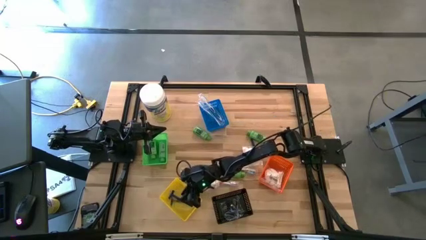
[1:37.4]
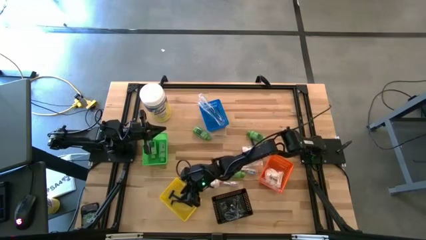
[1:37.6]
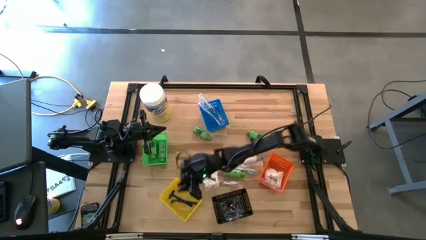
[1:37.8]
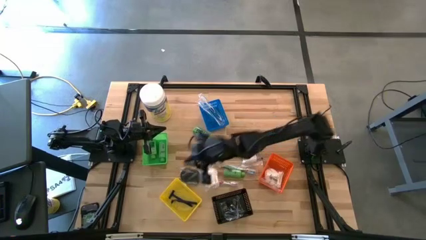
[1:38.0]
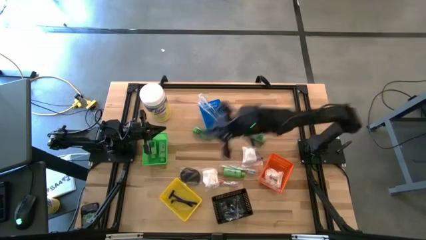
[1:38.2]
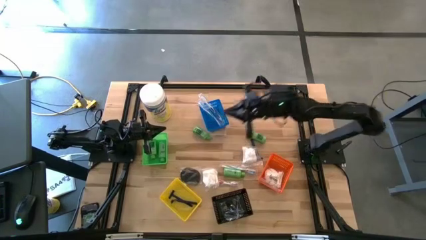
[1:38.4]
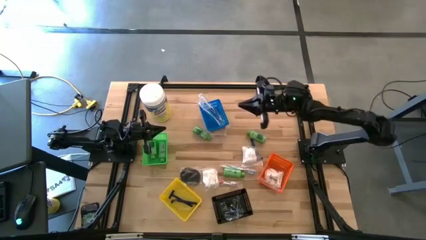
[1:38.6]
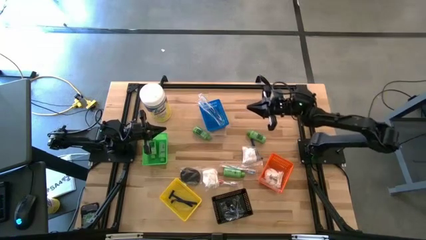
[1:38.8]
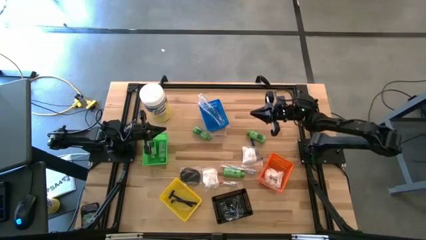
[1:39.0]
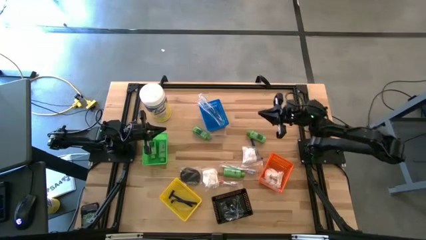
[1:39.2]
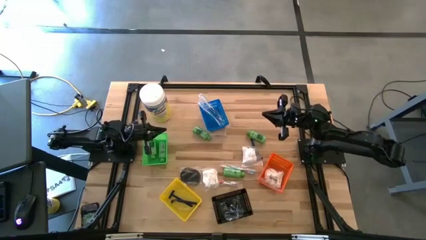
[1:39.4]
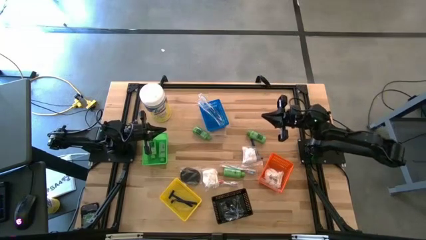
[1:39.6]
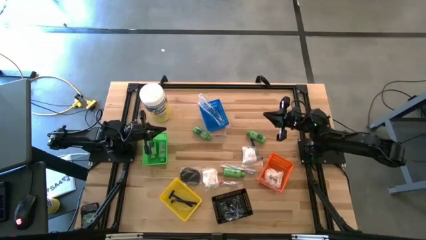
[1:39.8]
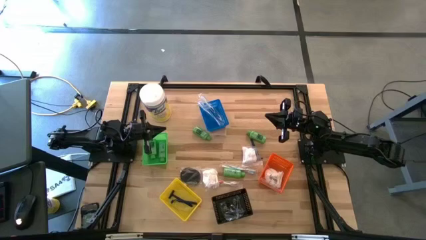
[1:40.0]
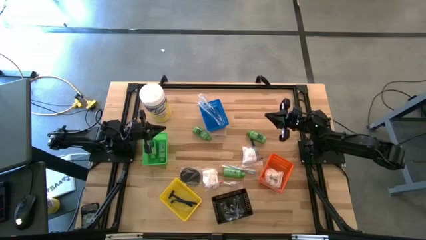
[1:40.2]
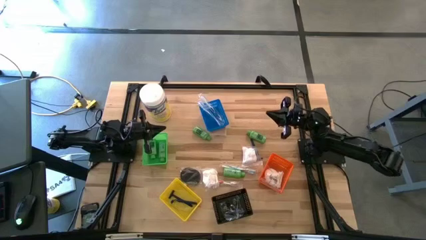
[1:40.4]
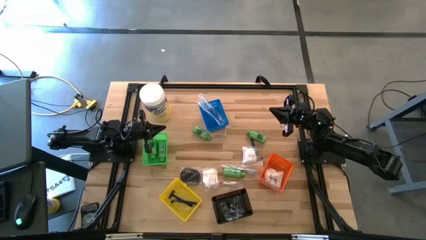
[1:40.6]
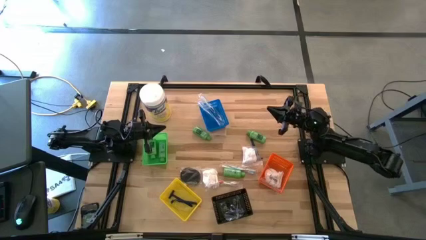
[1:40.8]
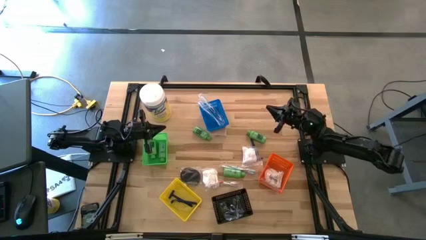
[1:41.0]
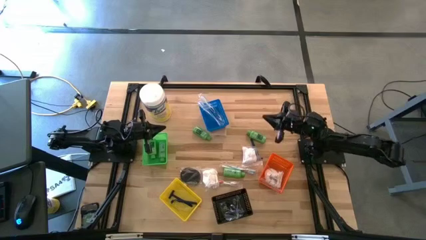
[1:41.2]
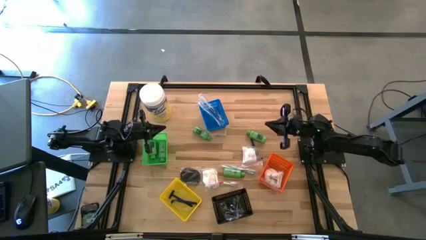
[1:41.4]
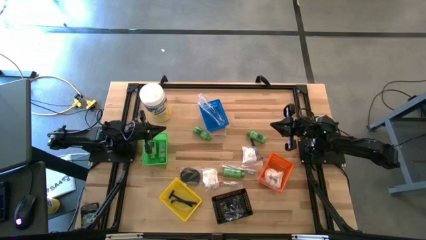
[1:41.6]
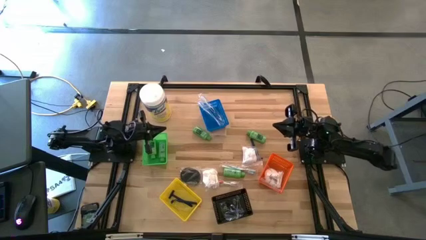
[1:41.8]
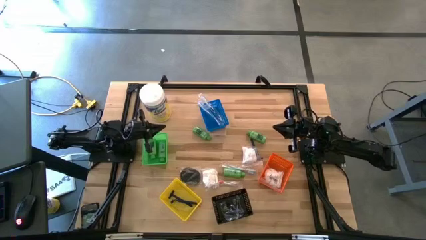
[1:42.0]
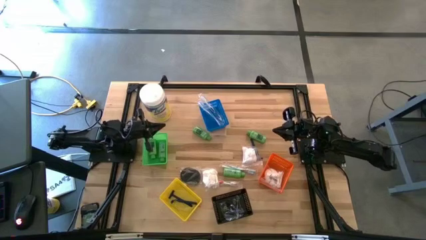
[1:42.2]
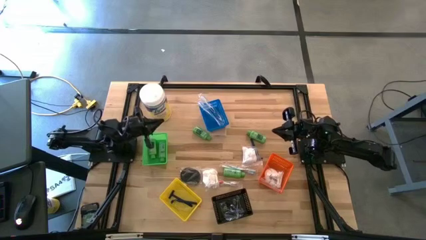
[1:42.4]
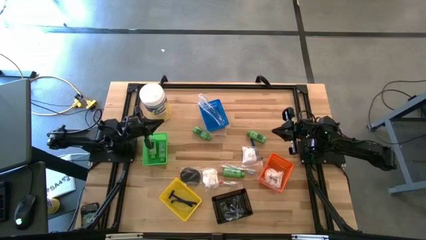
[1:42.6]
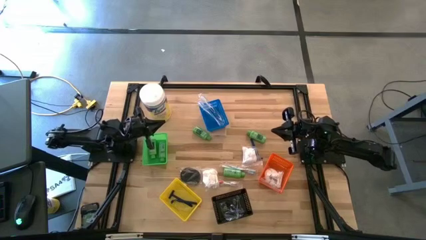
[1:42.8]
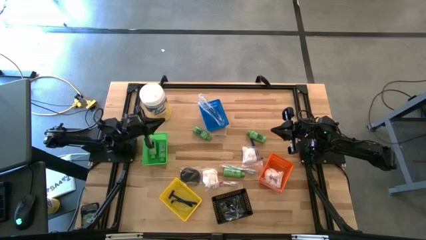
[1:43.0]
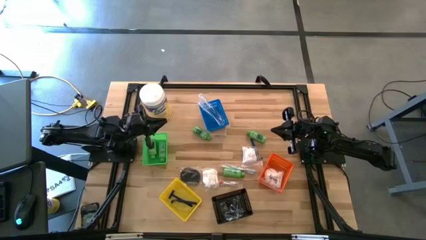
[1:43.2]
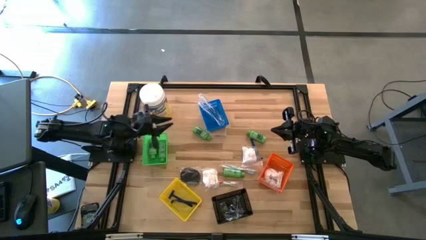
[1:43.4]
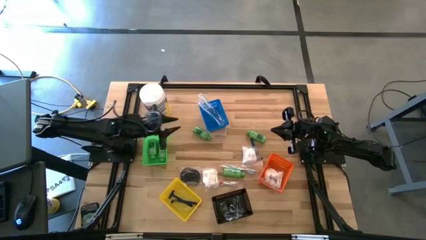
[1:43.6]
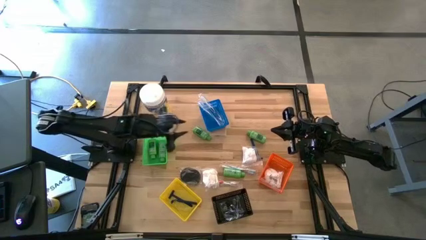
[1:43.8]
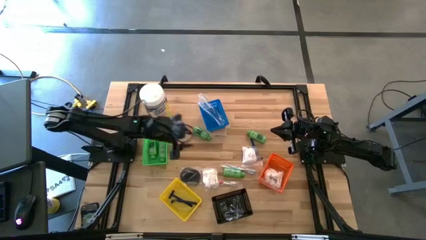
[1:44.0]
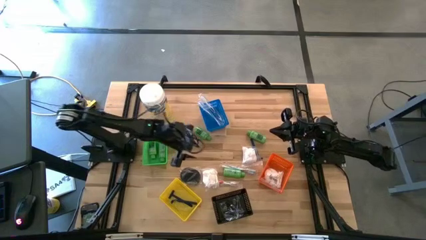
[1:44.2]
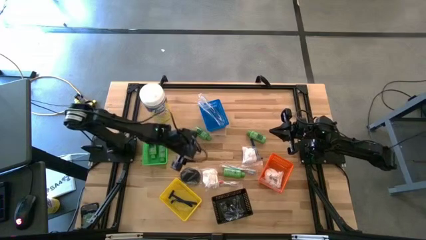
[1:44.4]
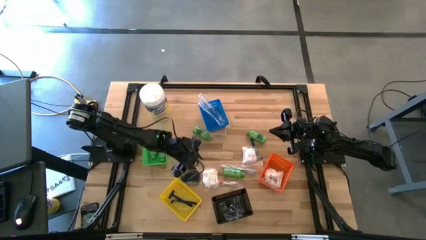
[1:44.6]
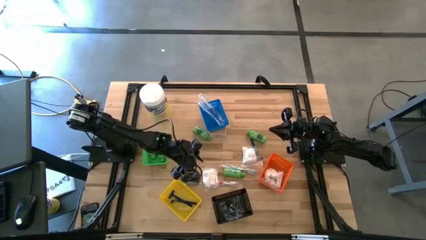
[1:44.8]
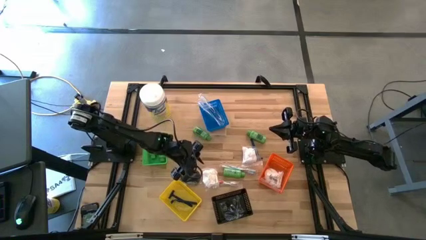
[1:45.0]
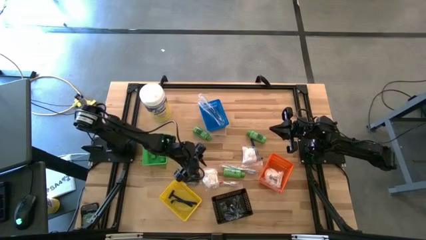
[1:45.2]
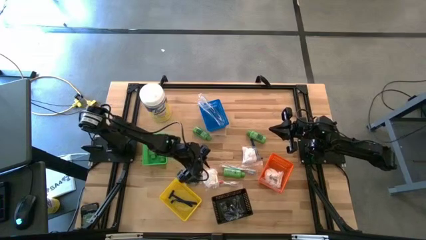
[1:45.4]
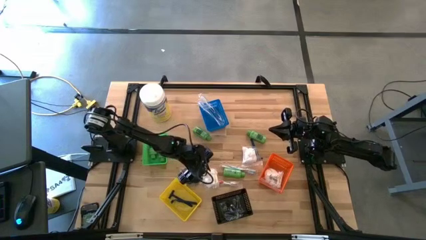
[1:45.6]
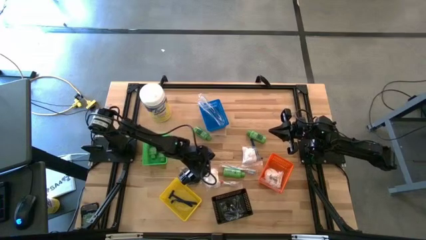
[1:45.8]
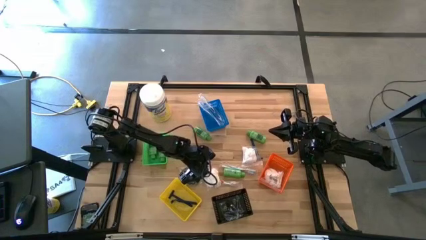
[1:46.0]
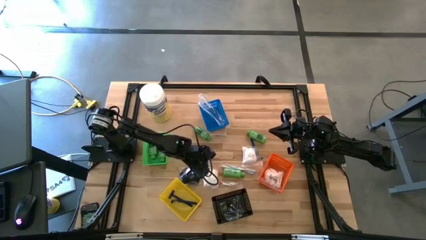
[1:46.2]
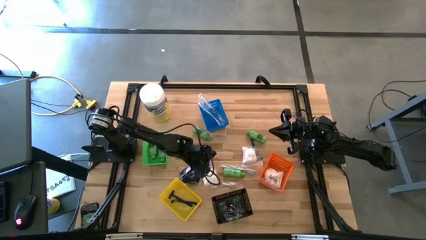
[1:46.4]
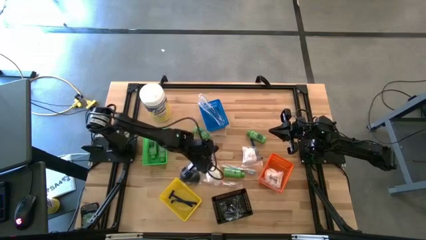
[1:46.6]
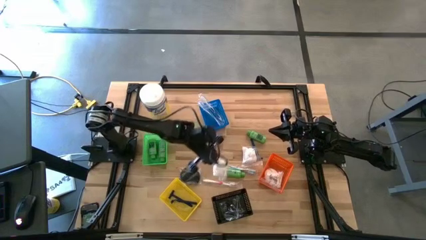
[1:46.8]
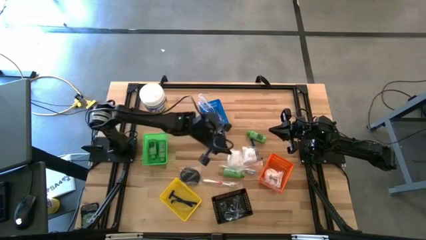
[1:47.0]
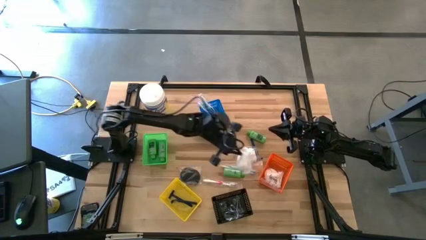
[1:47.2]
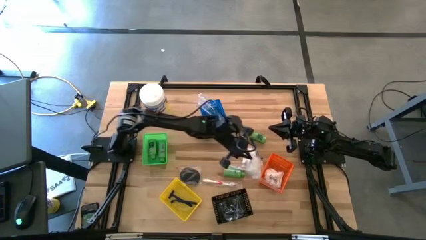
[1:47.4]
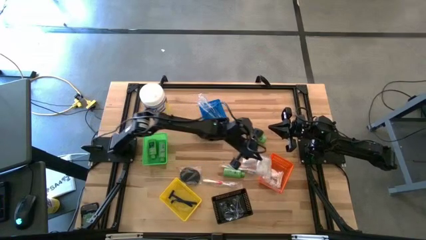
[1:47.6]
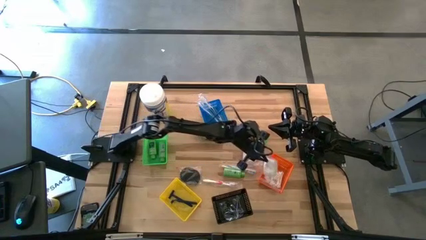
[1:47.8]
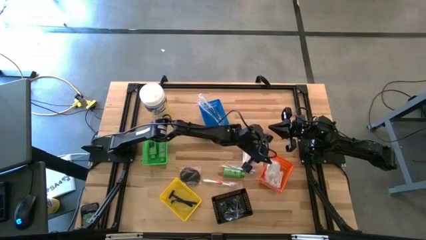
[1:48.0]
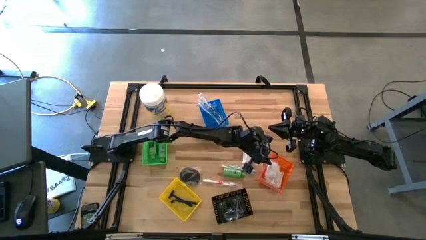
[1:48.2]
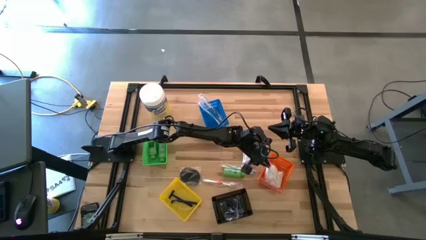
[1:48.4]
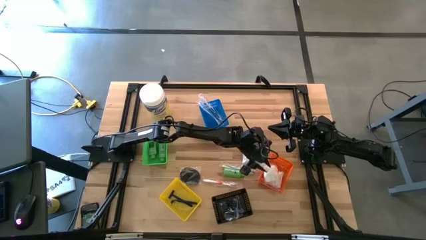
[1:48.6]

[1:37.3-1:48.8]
Task: Pick & Place Travel size toiletries
Put the white cotton pack into the orange bin

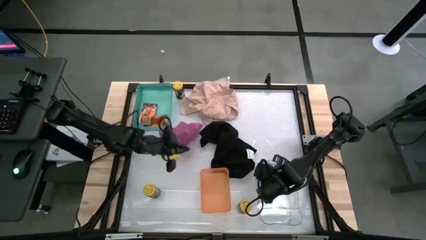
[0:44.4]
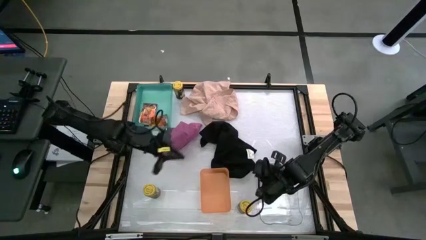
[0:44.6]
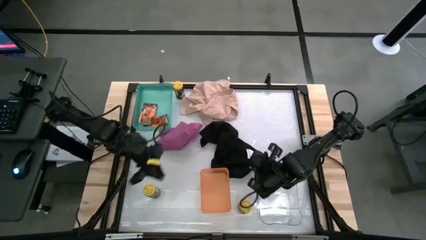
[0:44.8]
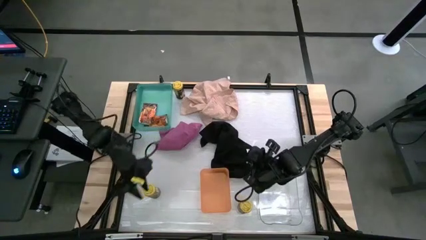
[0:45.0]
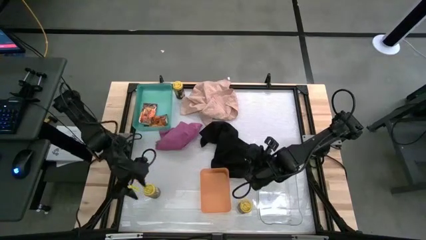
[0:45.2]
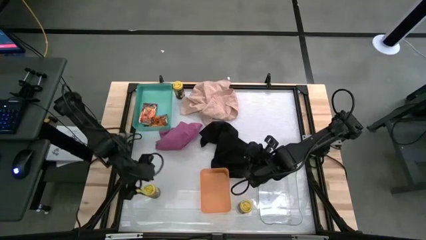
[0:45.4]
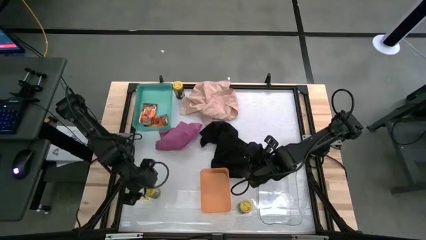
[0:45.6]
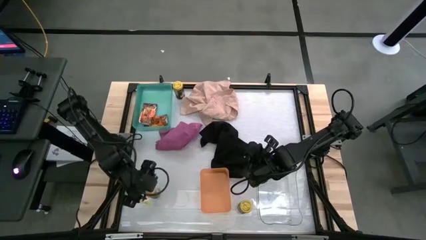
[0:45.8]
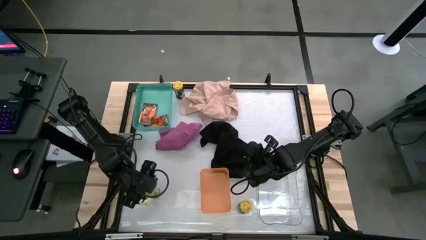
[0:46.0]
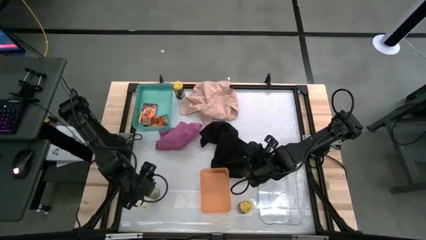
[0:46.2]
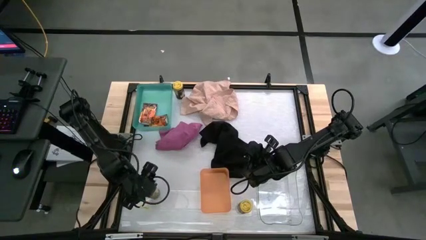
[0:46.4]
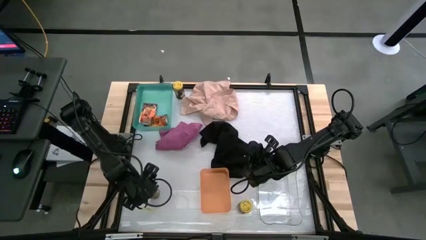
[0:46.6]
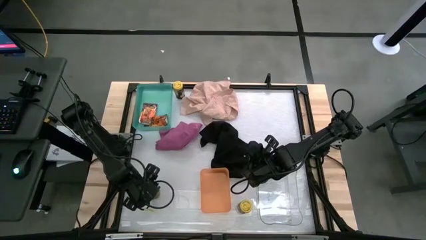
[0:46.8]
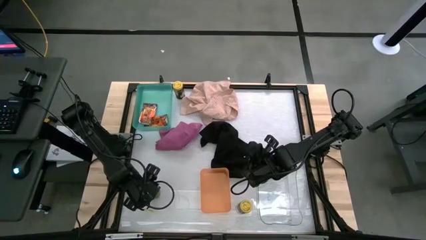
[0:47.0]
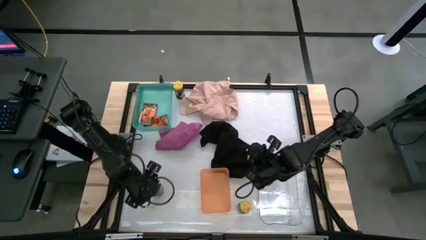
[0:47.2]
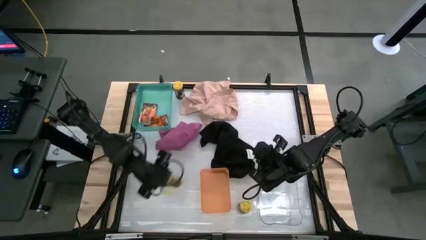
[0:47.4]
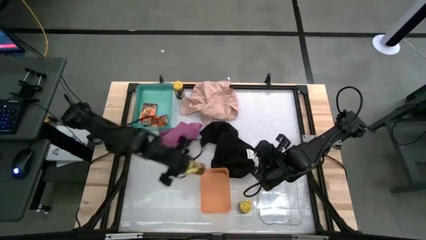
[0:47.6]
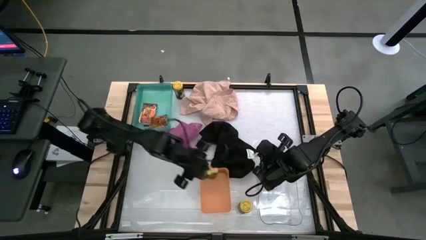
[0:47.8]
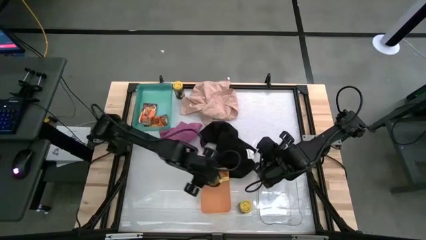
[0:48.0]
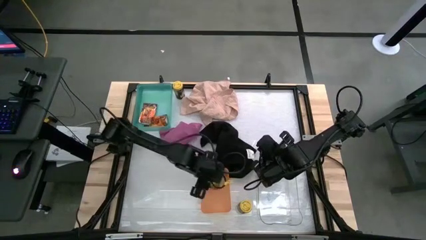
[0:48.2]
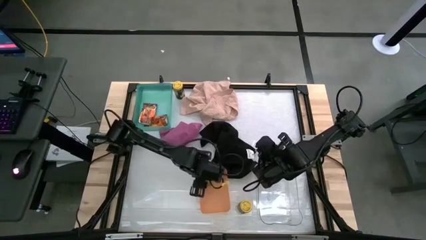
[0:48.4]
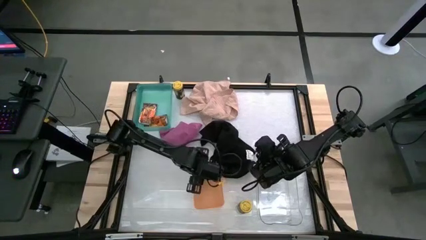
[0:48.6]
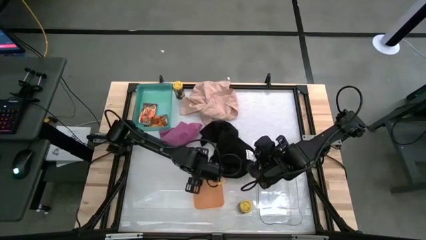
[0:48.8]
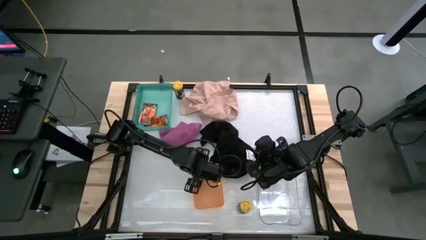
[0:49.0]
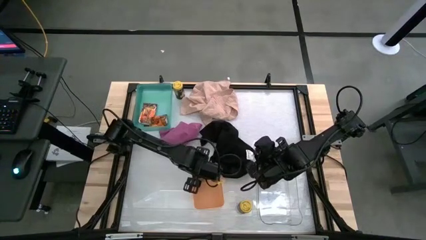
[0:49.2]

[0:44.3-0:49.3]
Task: Sort spices by type
Put the bottom left yellow seasoning bottle into the orange bin
